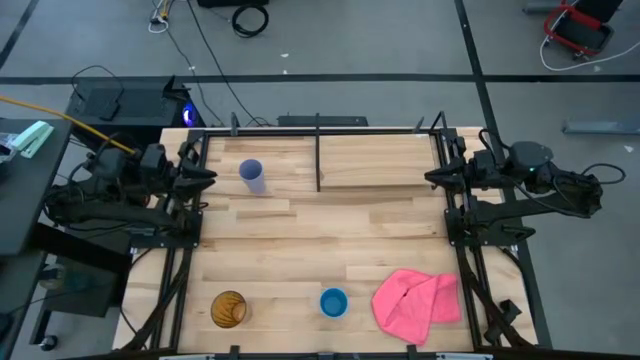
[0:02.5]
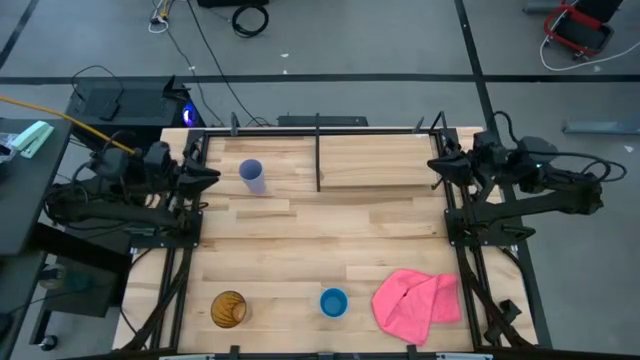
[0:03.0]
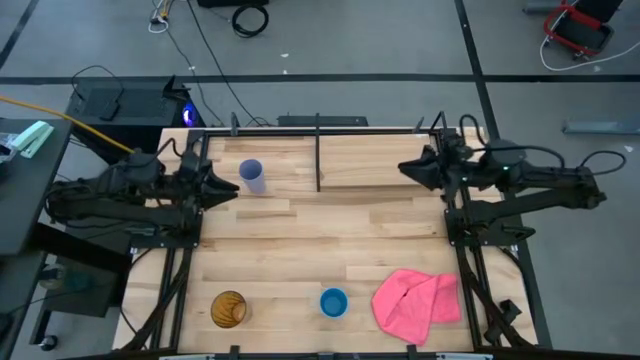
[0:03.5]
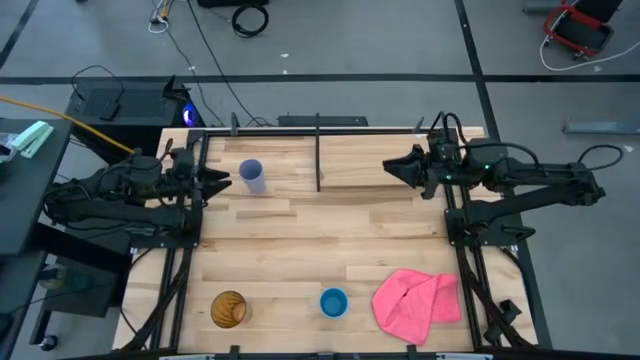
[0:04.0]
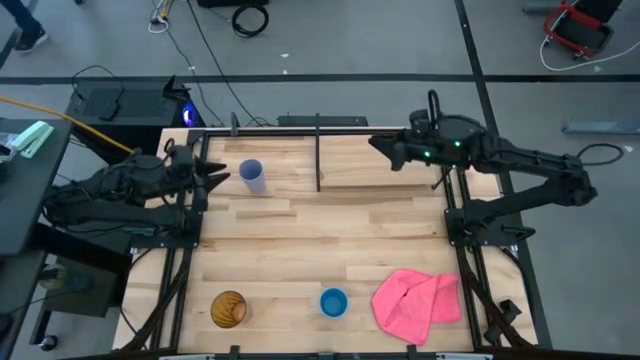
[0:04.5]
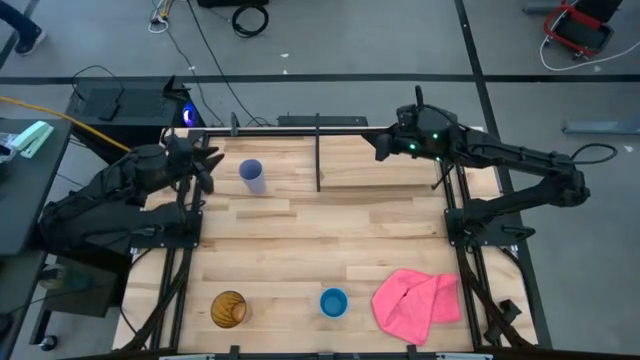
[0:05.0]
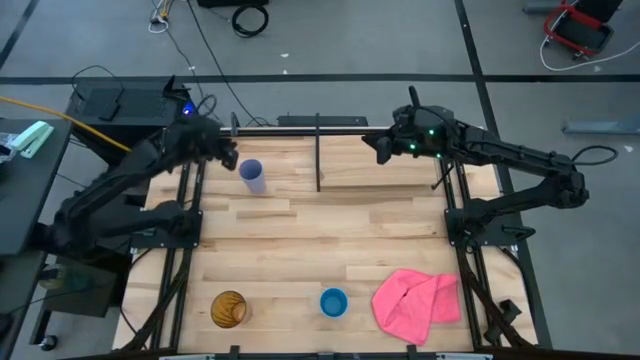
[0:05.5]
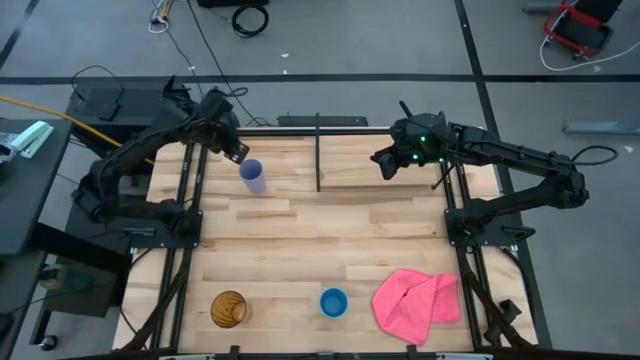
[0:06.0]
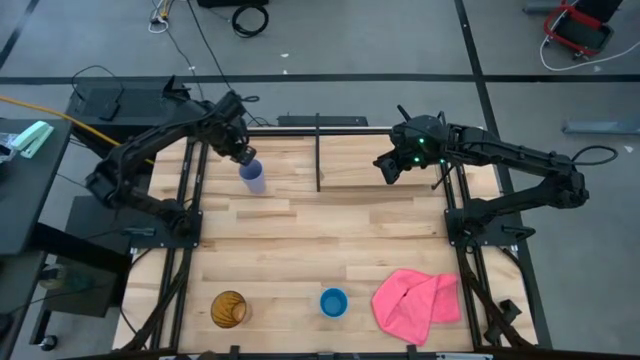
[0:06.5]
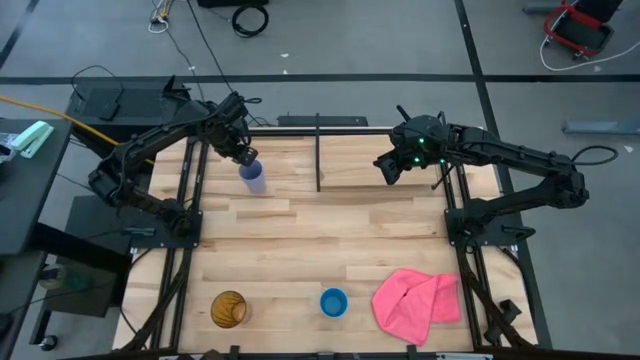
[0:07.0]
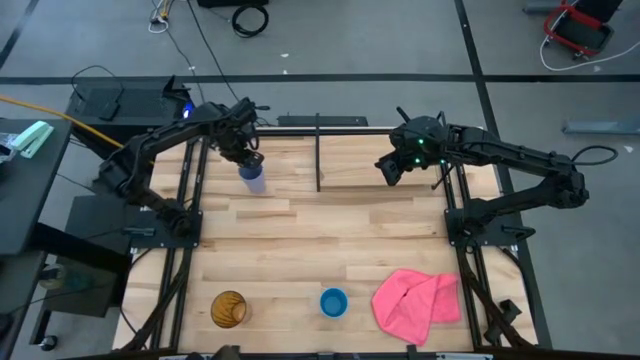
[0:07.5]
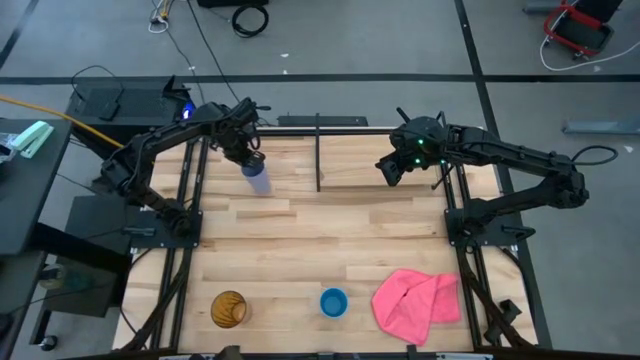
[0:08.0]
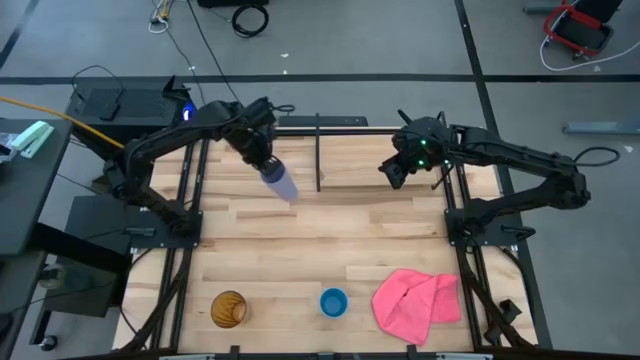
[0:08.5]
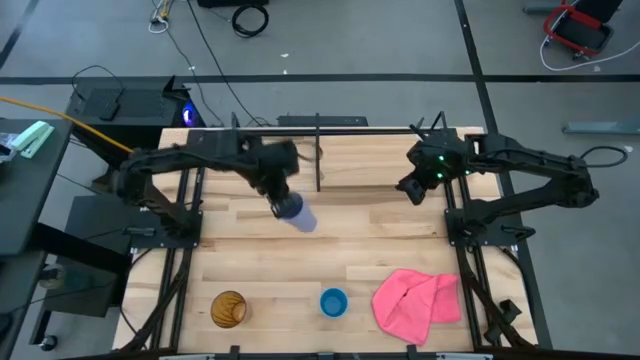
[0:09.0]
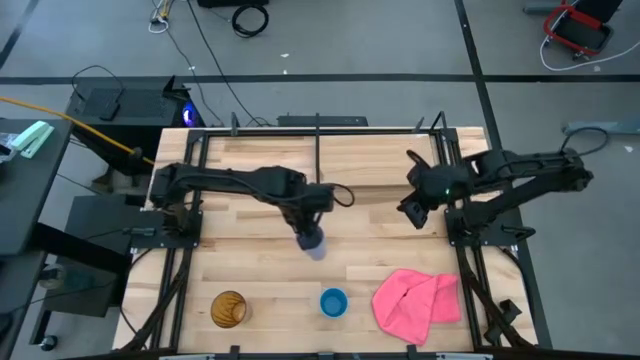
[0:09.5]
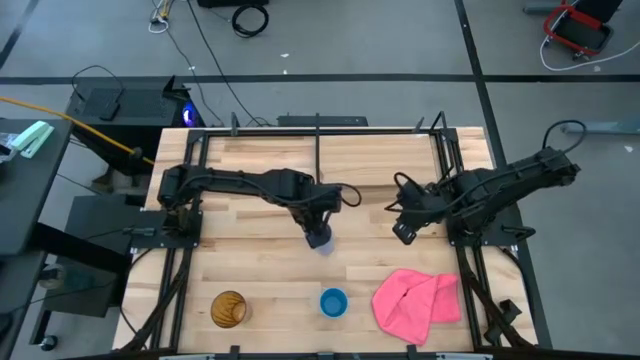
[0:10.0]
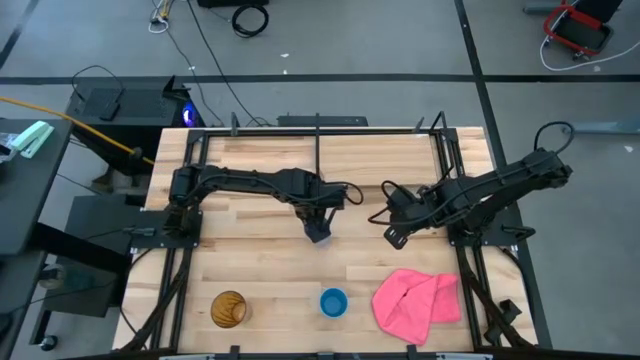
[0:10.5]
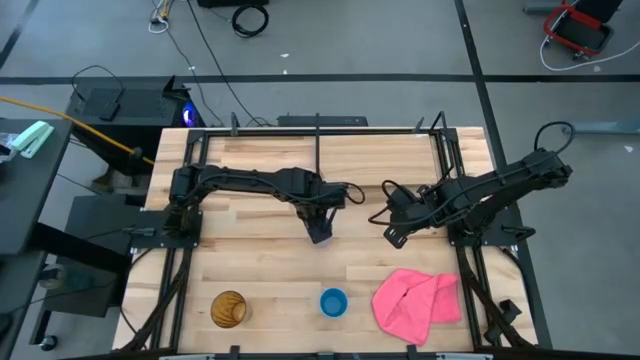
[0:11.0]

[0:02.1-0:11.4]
Task: Stack small to large cups/mugs on shelf
Move the purple cup to the middle

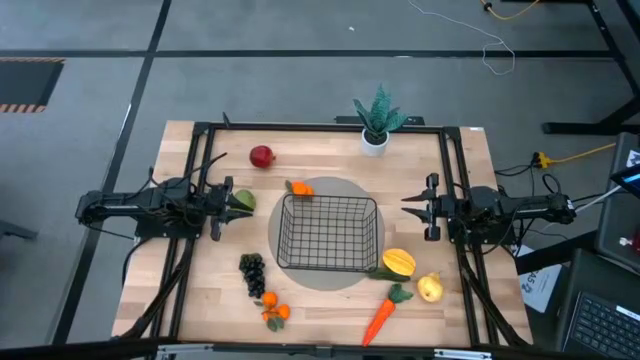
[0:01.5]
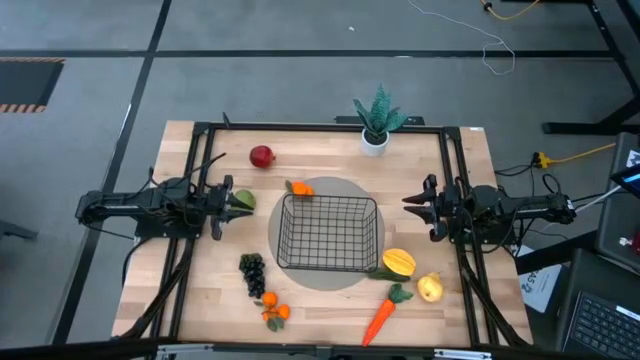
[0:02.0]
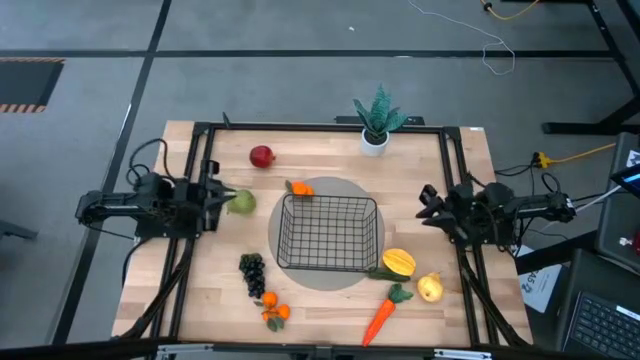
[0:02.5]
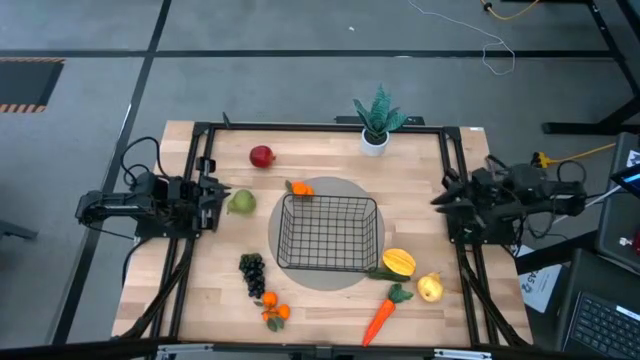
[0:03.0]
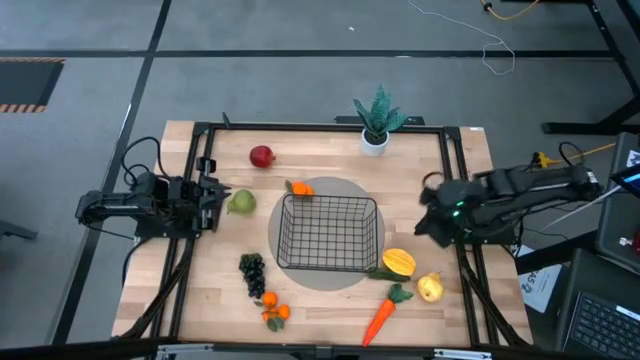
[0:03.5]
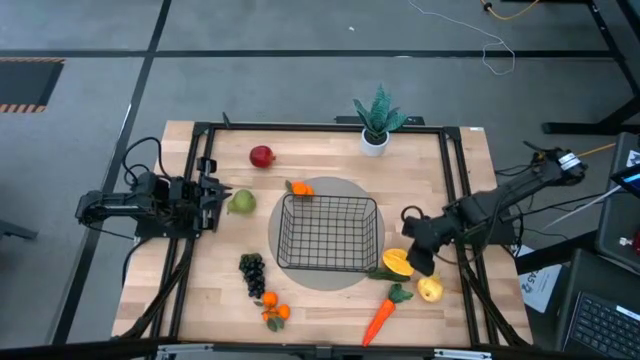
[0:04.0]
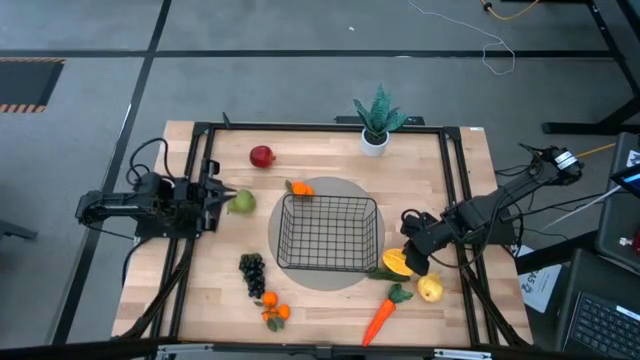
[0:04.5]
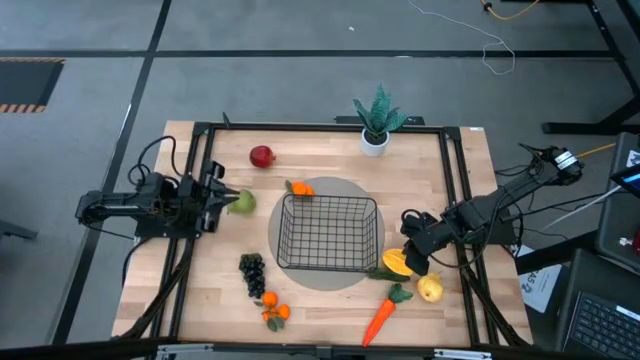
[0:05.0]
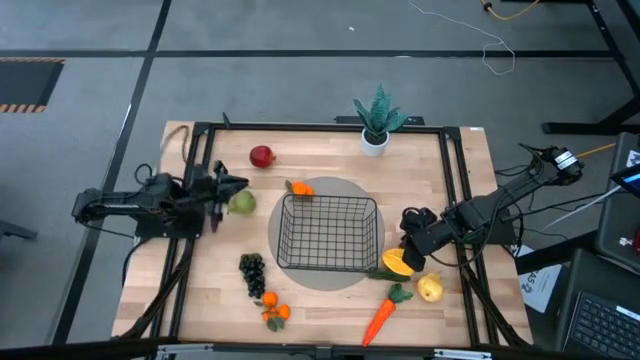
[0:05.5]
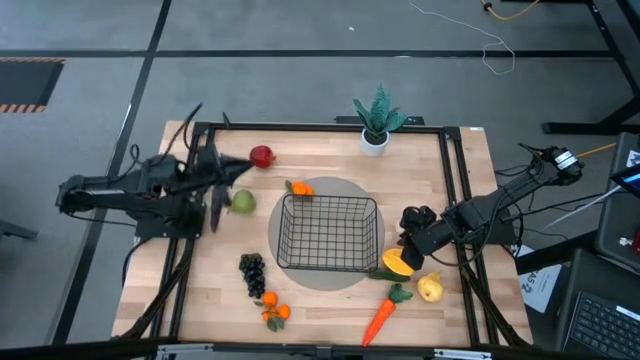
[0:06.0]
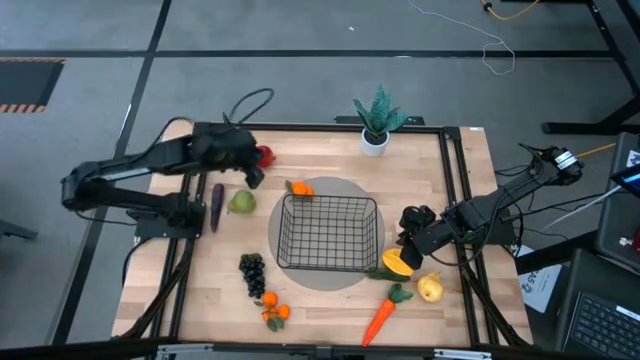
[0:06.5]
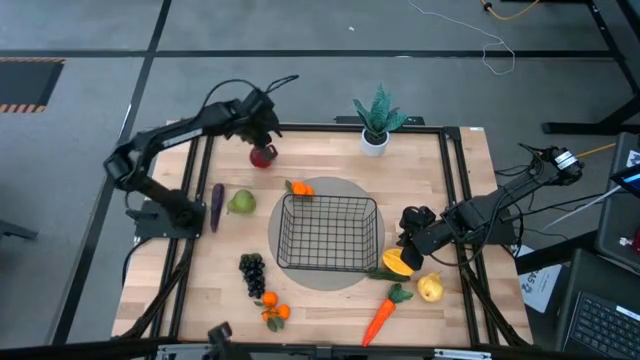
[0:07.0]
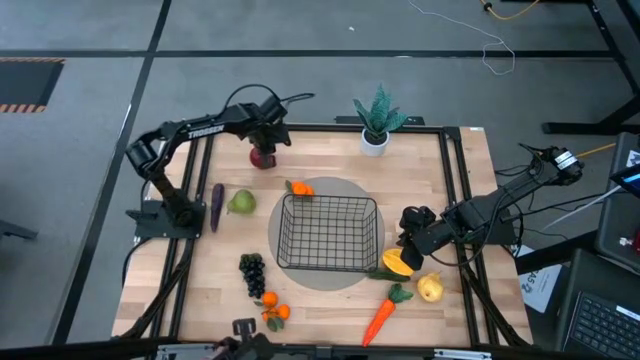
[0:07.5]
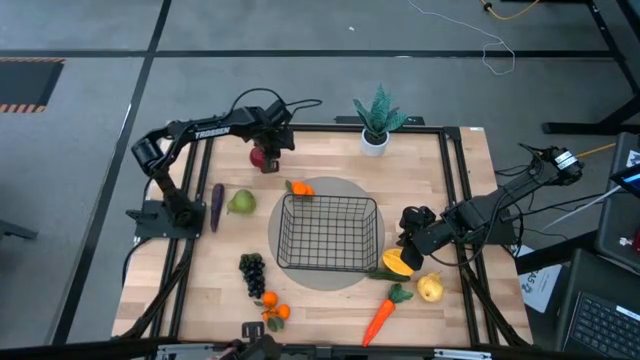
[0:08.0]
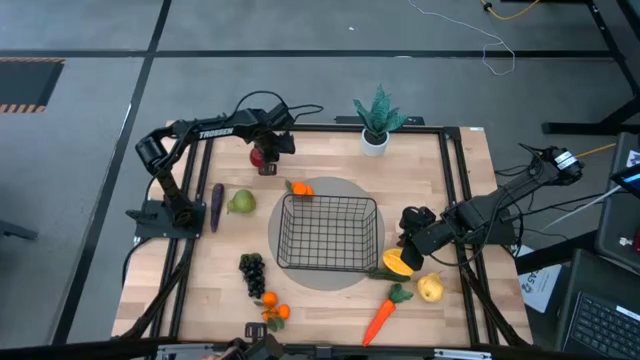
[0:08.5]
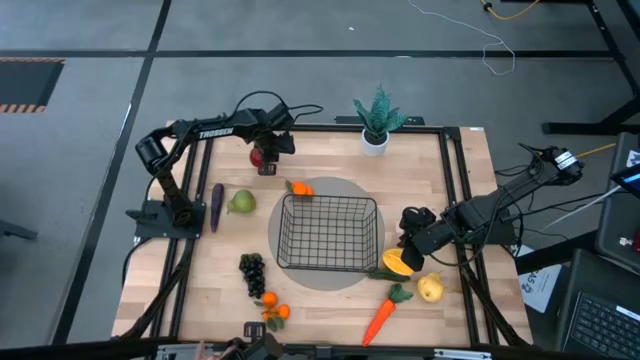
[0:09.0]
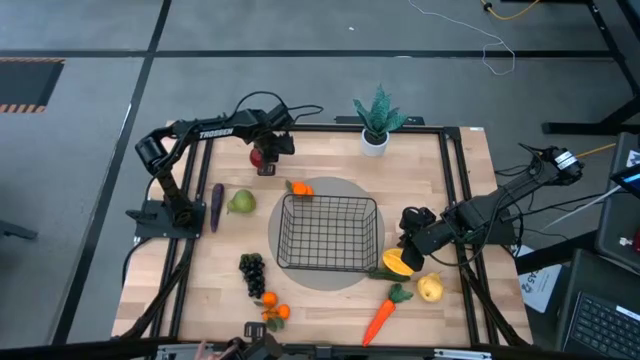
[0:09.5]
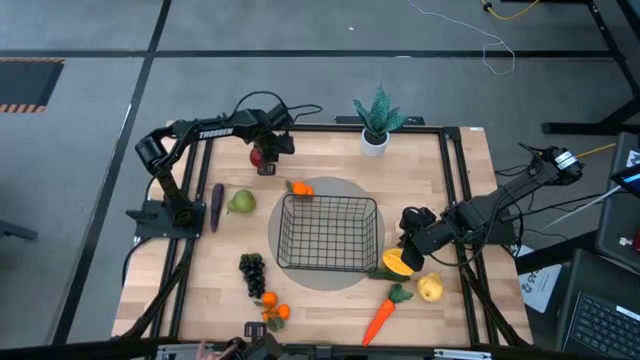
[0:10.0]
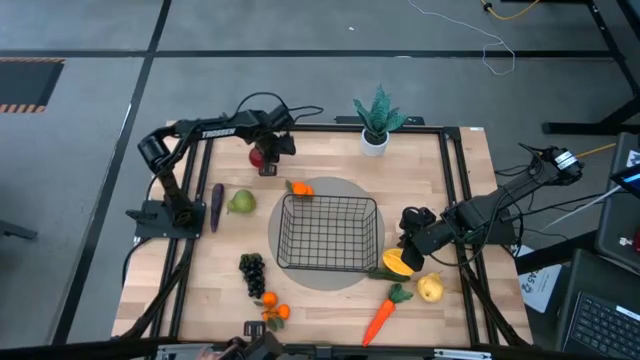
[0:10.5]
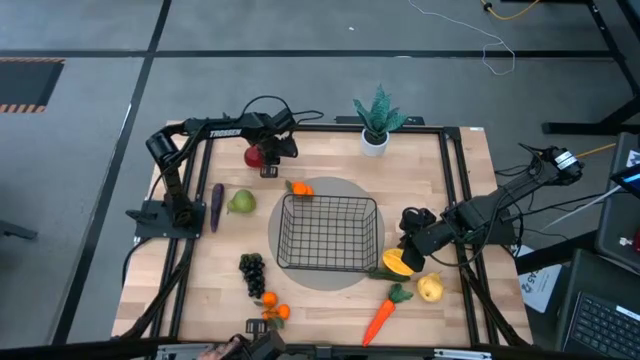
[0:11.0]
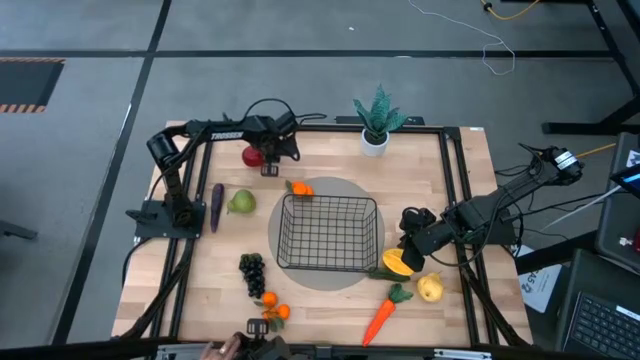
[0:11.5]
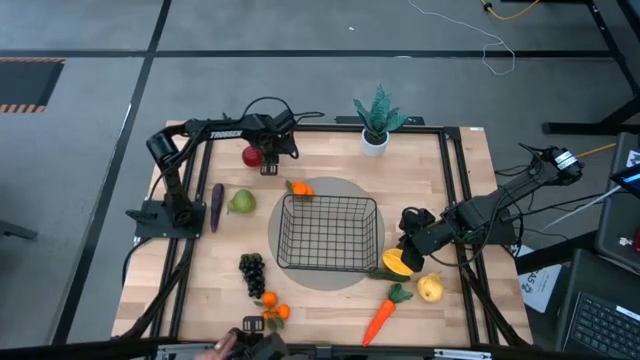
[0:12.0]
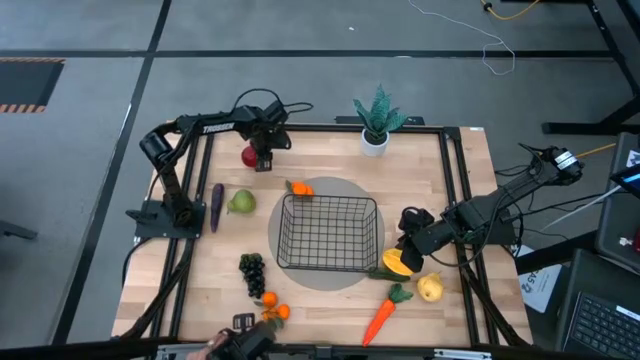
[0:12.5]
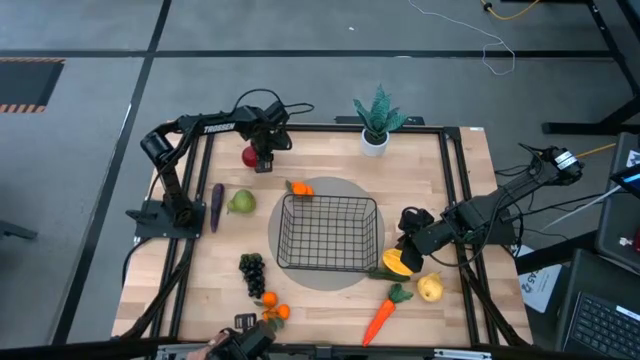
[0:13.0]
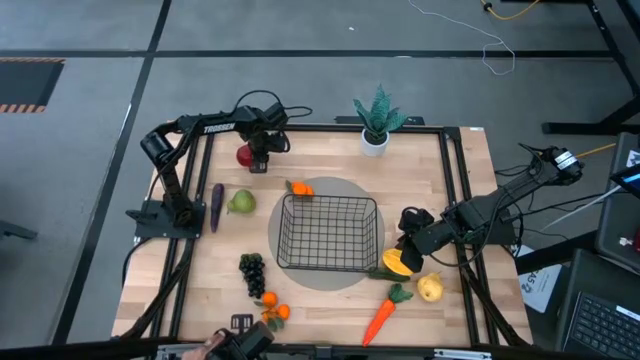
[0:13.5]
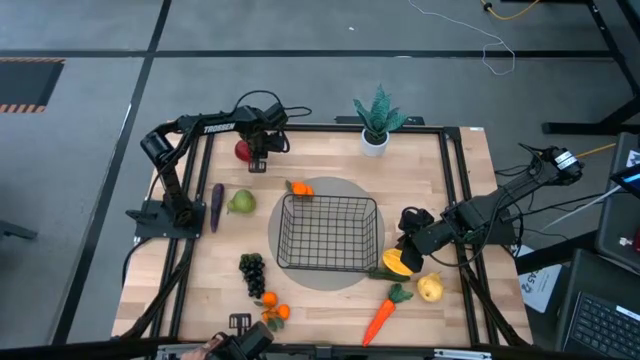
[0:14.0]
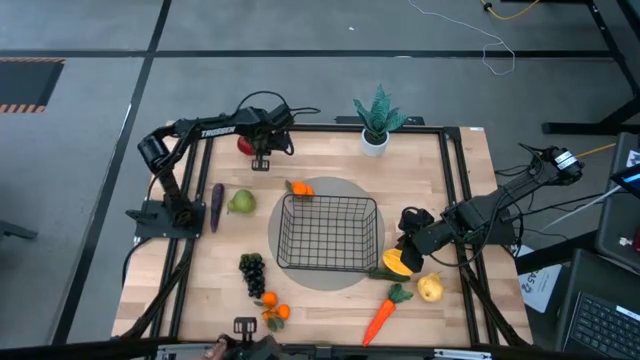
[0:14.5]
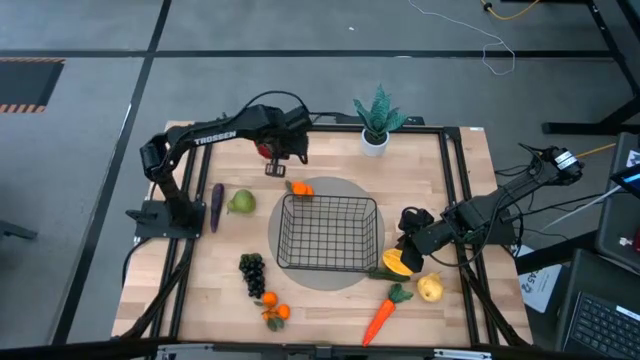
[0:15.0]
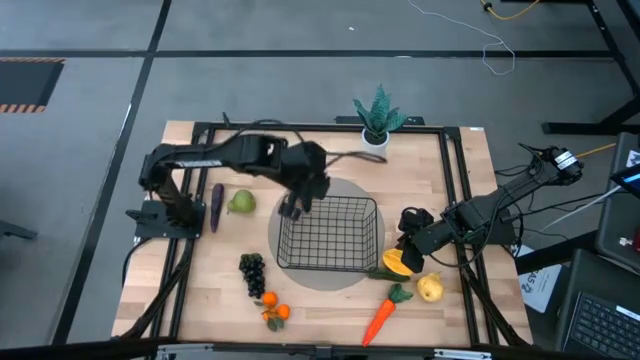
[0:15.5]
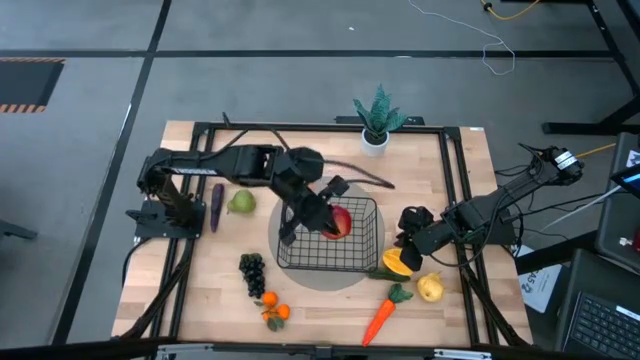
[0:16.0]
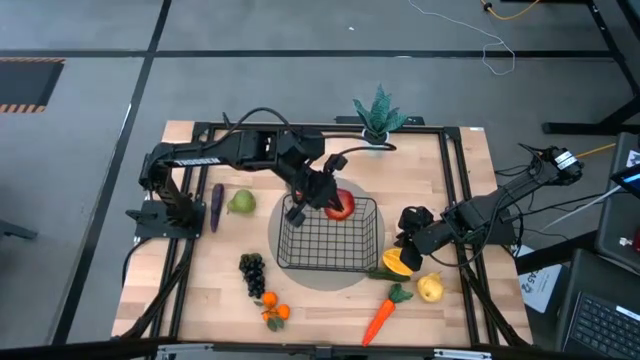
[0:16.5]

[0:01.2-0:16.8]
Task: Build produce basket
Put the pomegranate into the black wire basket
